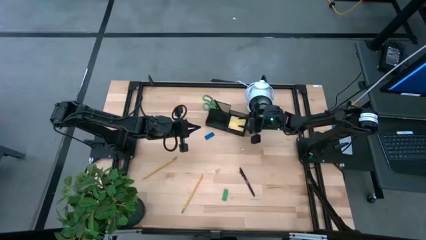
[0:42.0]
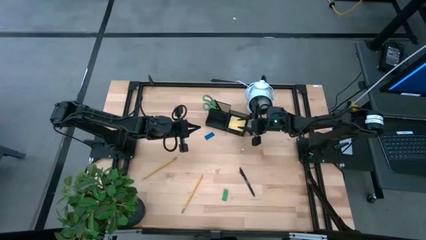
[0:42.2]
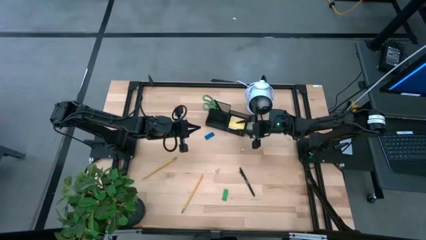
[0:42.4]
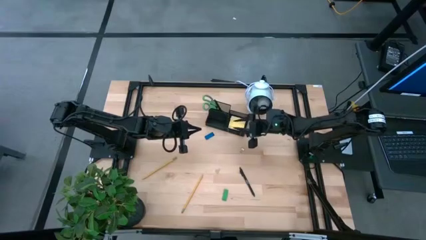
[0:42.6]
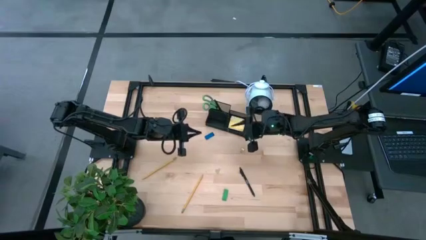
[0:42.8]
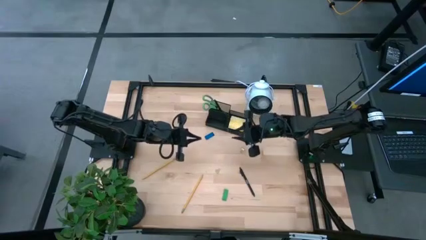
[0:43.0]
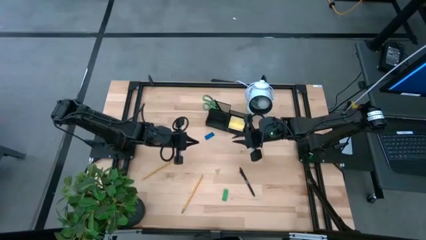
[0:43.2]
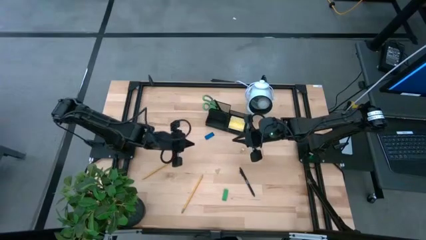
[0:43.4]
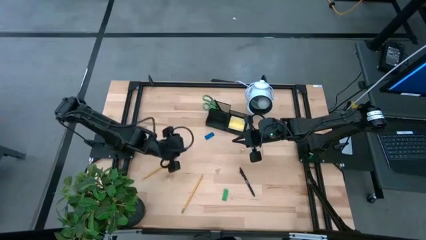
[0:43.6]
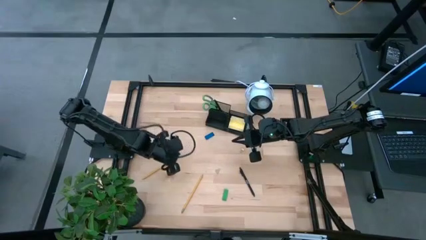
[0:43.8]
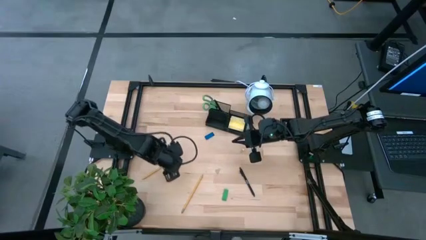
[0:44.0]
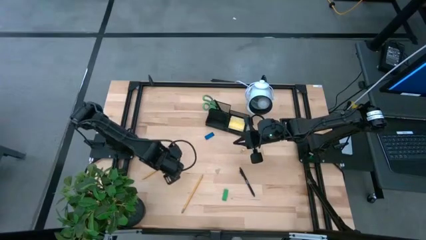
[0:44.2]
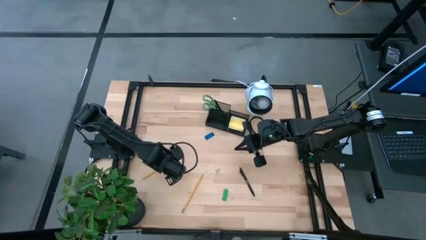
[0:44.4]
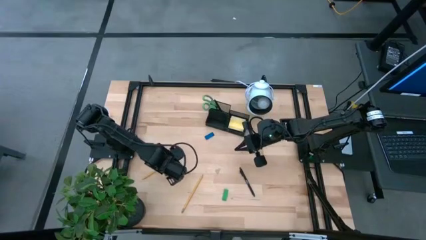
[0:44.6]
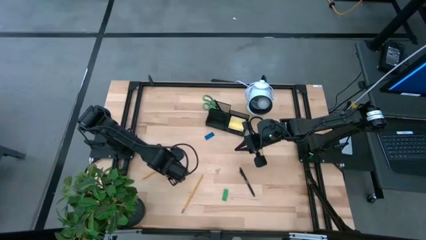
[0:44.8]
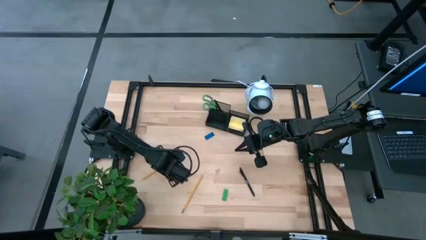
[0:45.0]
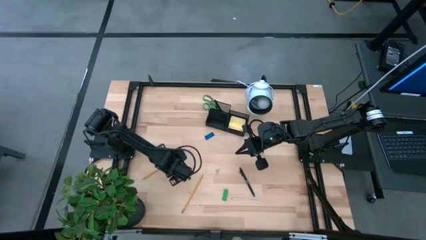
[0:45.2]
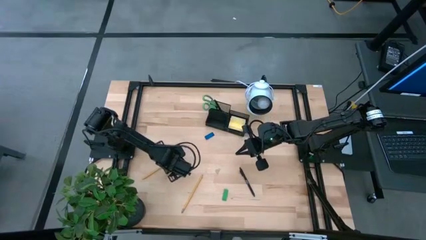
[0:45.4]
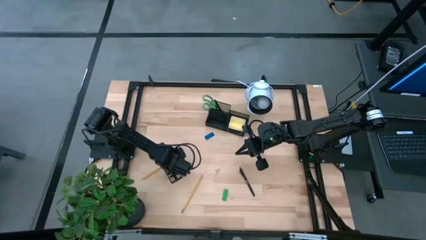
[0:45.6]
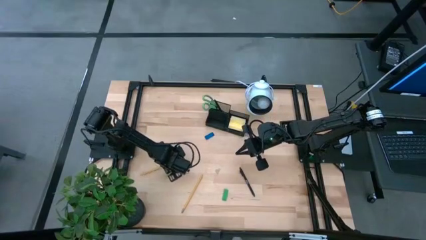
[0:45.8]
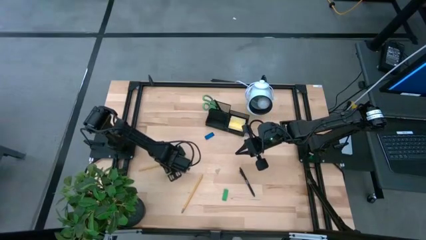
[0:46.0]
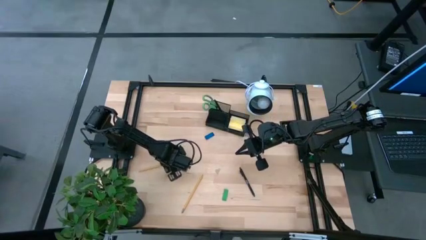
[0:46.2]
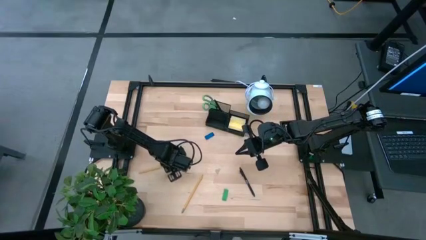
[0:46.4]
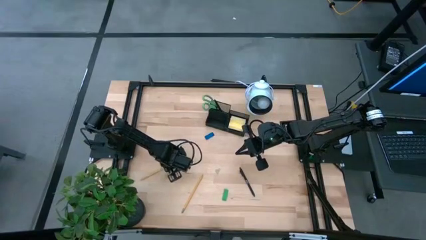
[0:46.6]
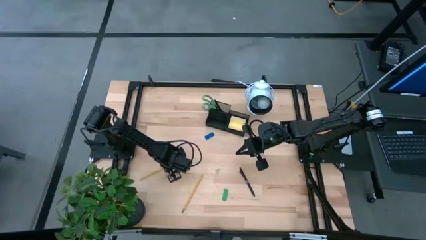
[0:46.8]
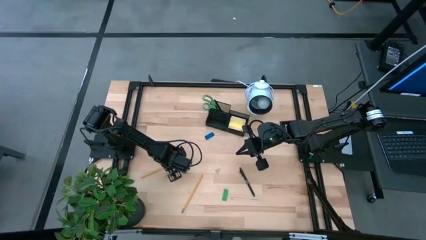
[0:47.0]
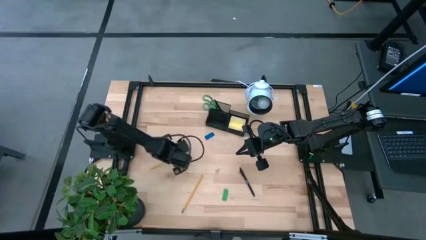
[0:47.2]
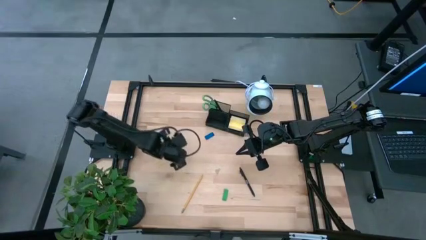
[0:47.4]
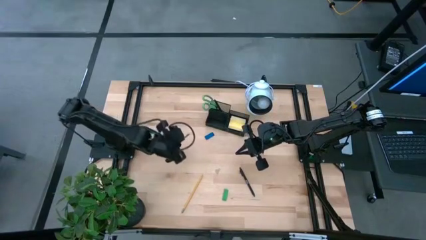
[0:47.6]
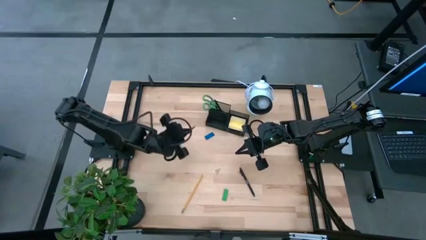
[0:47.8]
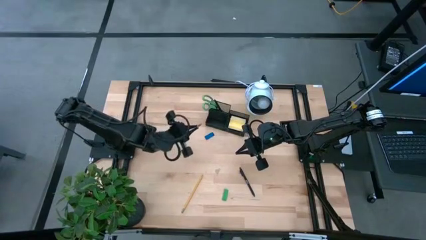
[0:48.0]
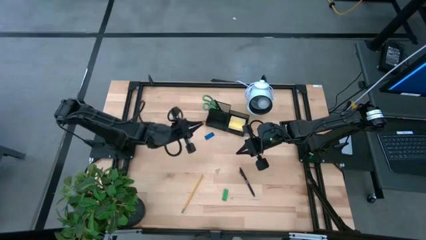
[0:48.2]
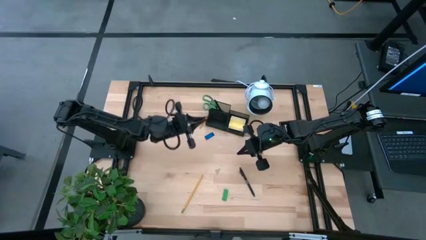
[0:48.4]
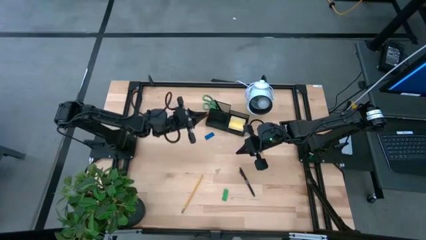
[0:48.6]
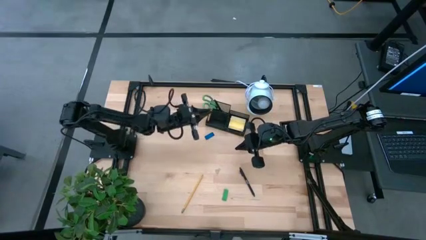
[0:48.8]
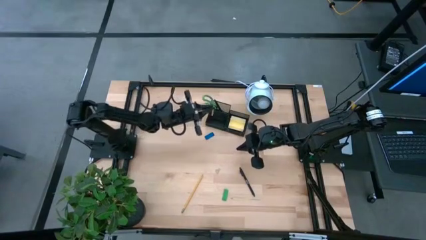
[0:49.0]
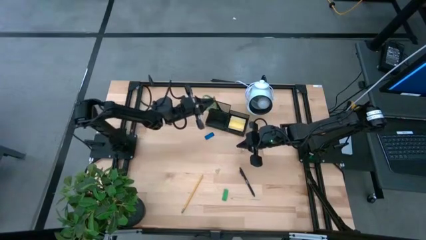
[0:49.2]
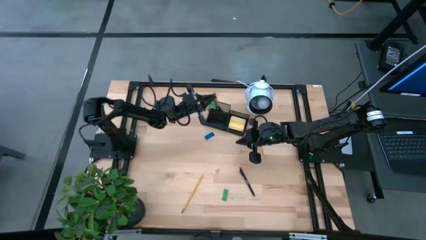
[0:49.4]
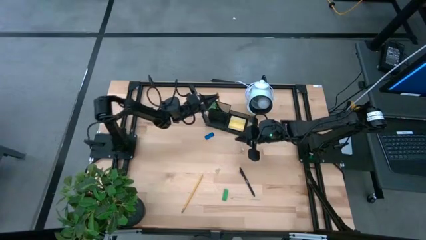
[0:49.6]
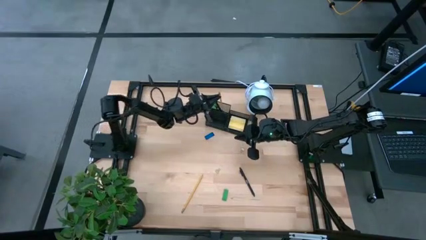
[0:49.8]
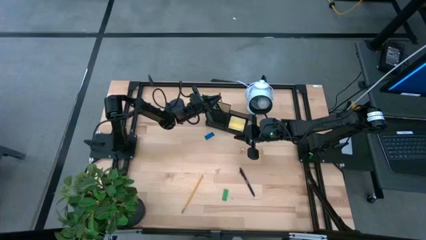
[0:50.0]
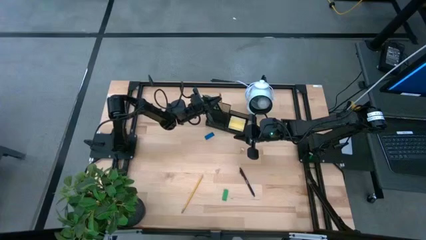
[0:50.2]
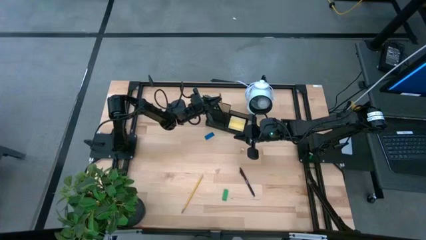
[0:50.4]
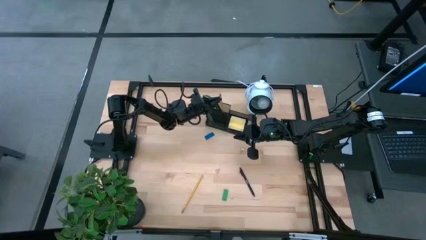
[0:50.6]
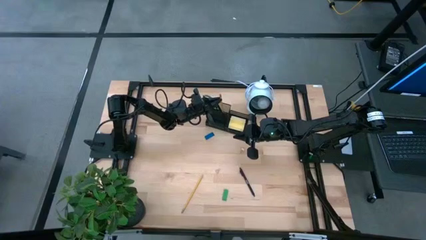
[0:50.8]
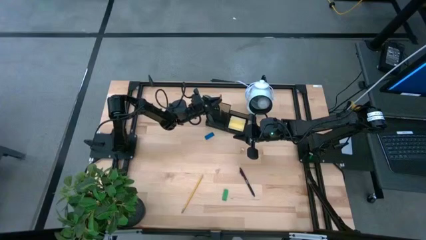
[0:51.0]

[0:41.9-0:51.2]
Task: Pick and place office supplies into organizer
Put the yellow pencil into the black desk organizer

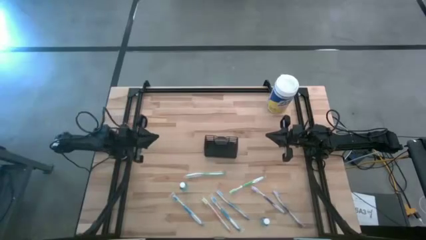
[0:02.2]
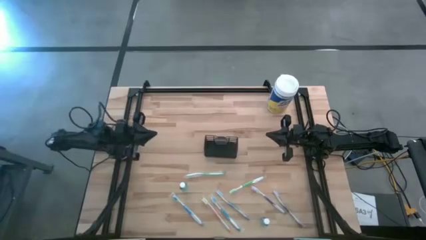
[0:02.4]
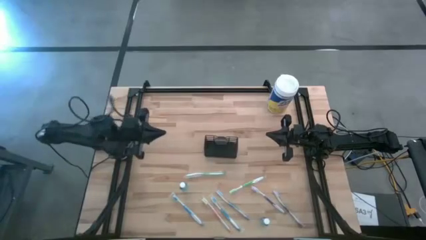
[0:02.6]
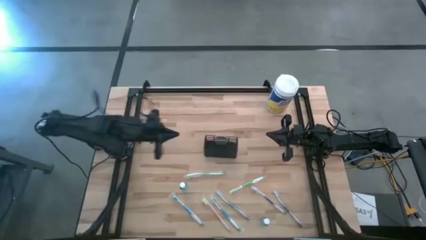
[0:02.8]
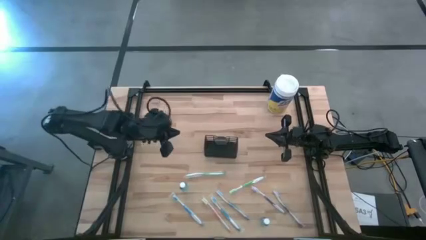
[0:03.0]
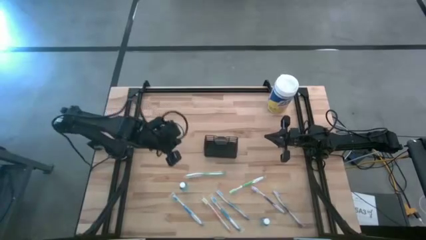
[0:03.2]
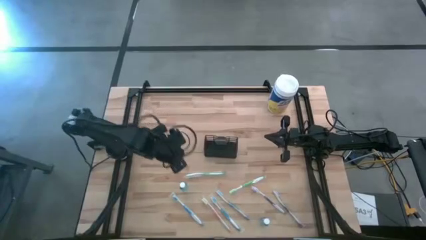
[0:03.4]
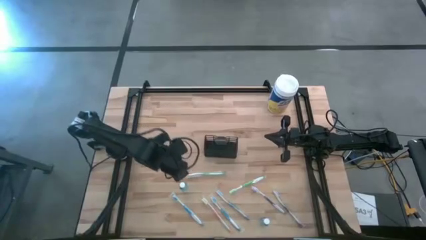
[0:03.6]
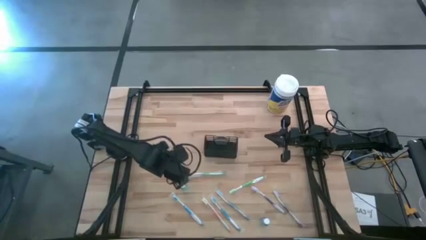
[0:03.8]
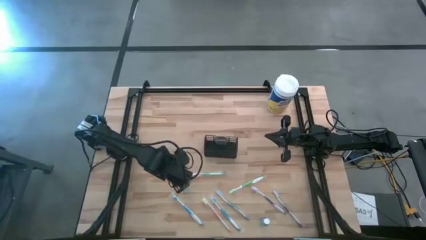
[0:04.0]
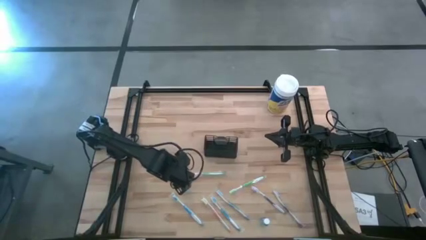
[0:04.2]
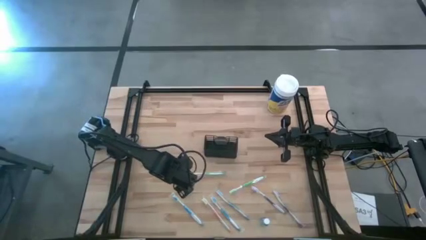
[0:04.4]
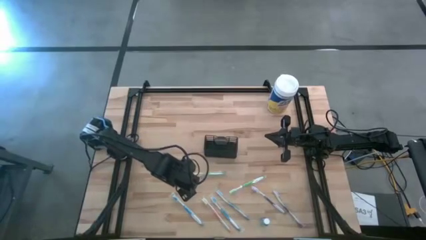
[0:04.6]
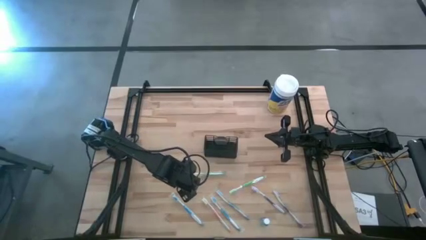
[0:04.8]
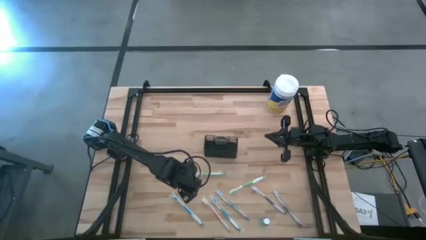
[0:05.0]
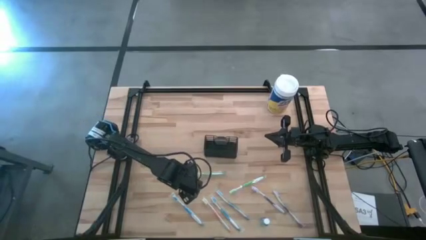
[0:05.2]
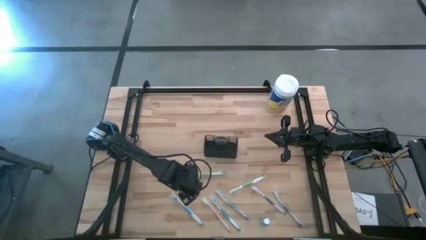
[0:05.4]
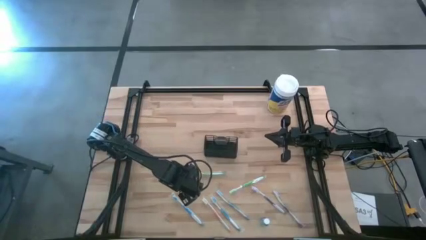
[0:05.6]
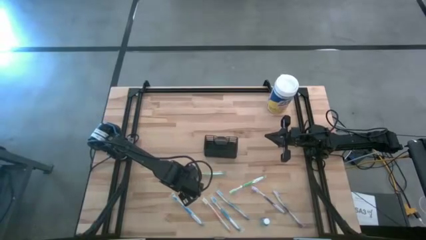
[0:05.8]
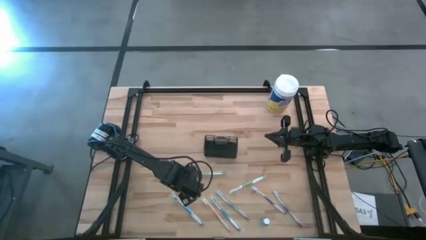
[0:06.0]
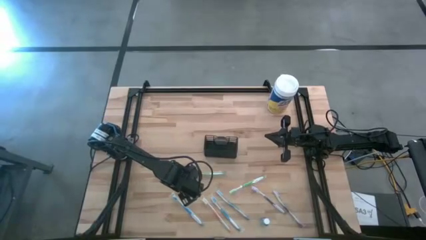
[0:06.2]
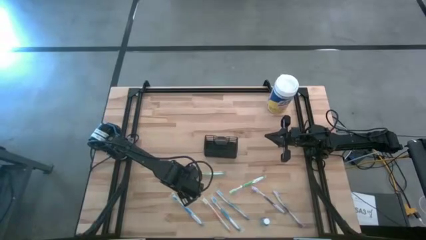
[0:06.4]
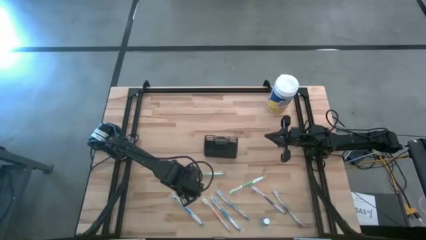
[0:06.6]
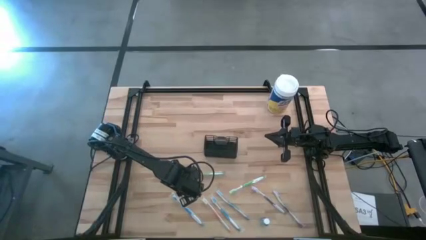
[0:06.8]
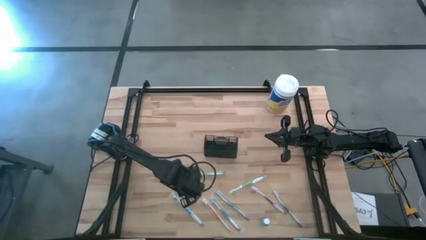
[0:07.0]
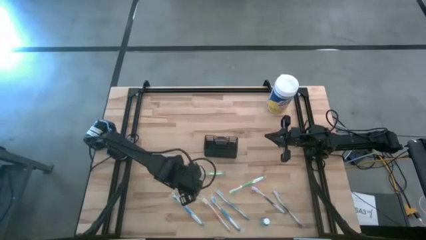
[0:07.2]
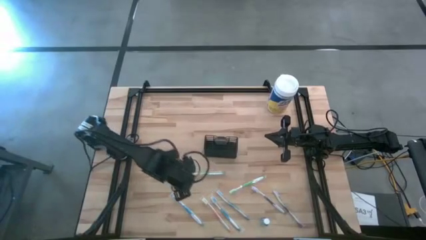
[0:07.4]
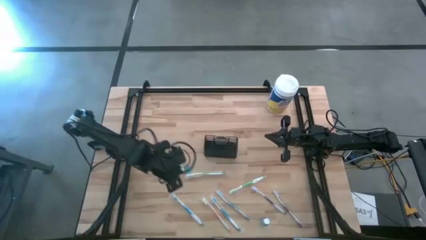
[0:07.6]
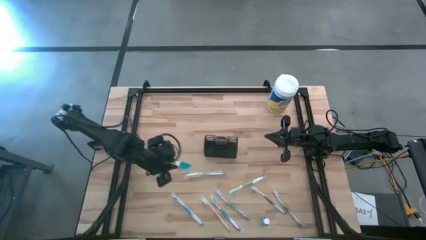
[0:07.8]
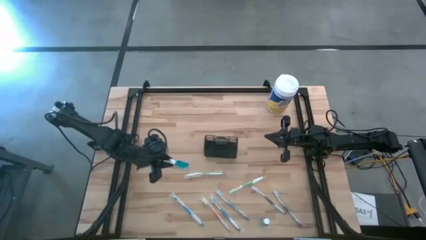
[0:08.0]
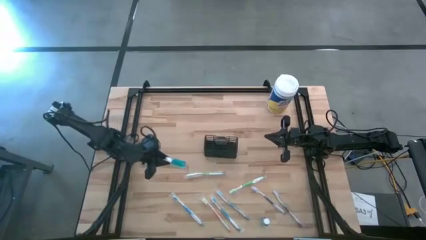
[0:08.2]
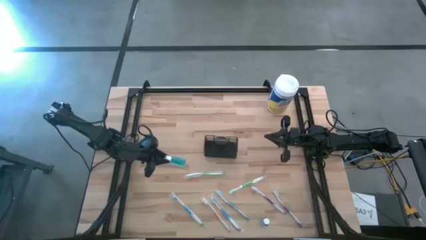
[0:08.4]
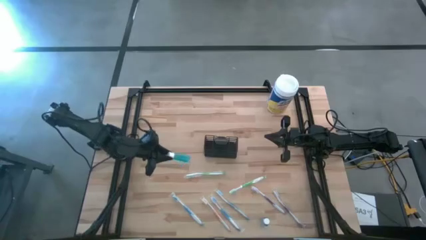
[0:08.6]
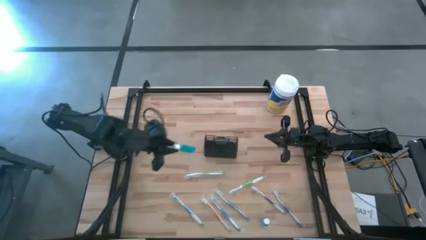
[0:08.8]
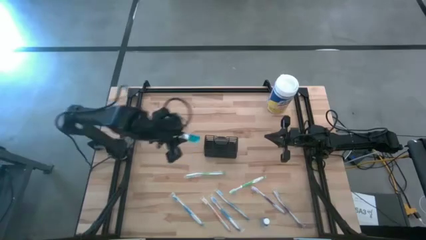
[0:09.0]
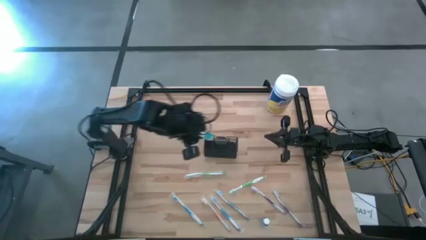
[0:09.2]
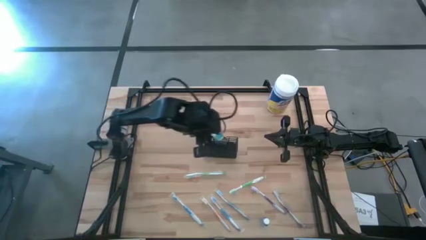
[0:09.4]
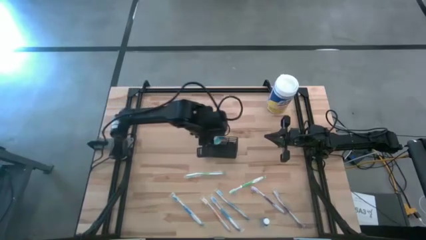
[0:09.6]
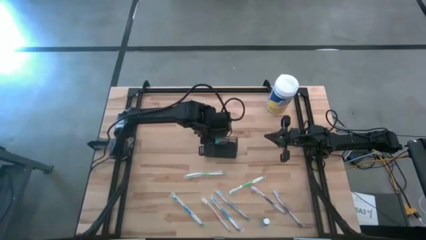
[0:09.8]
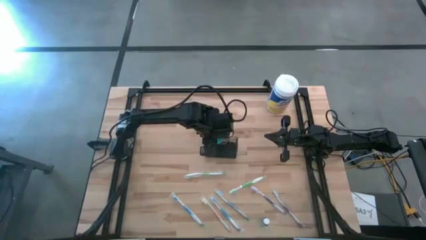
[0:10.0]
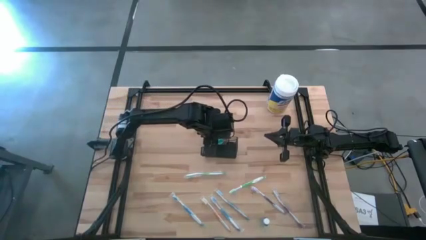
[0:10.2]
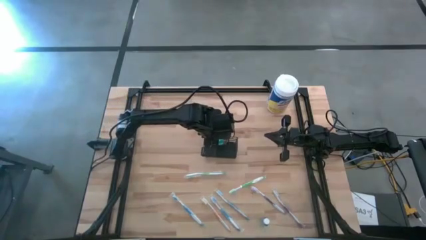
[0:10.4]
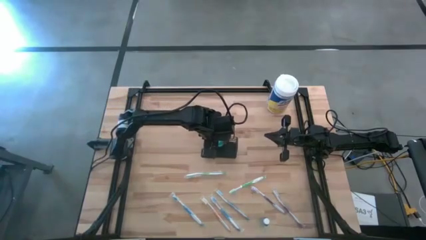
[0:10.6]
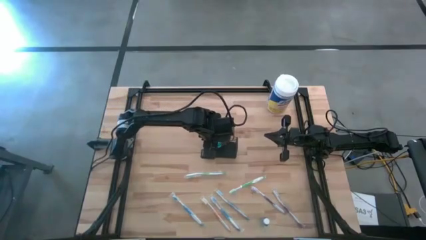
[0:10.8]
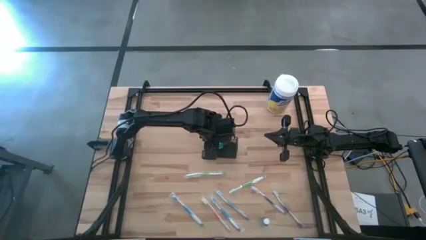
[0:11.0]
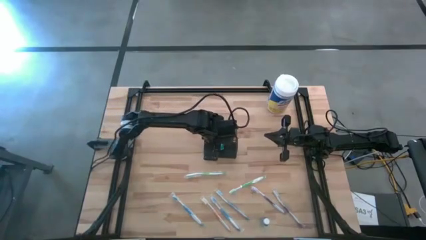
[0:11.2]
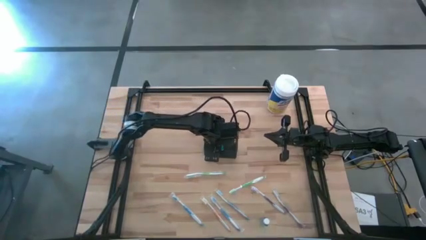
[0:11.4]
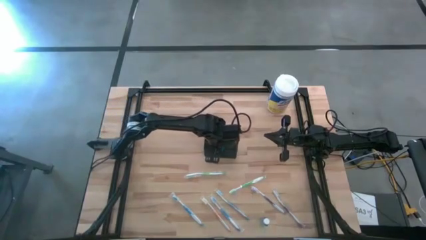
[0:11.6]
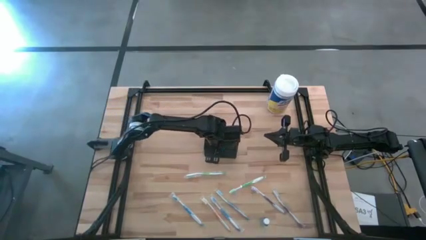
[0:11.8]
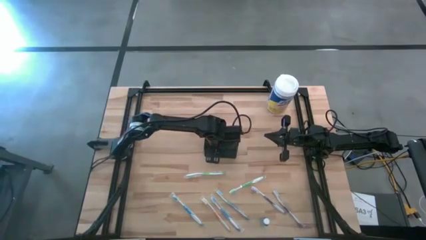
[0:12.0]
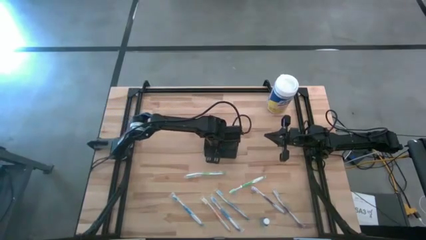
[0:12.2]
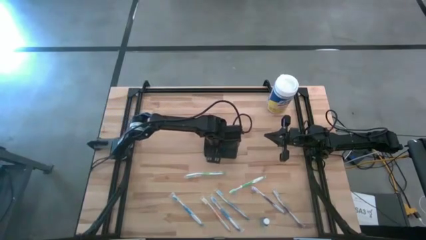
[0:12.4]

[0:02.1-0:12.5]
Task: Pick & Place toothbrushing station
Put the blue mouthwash bottle into the black organizer
